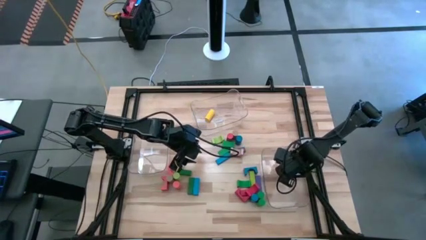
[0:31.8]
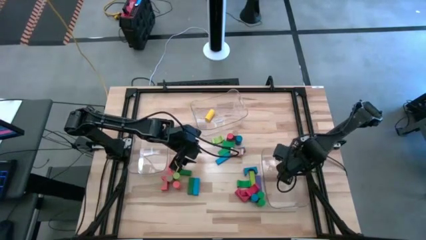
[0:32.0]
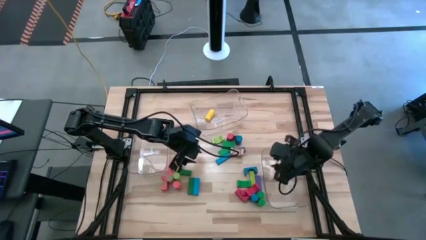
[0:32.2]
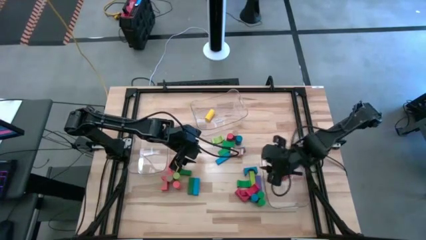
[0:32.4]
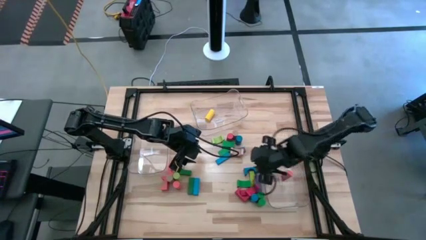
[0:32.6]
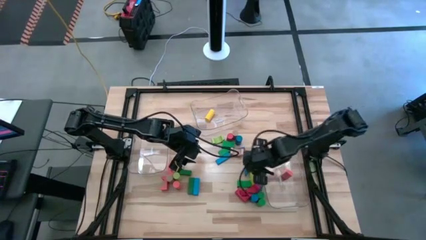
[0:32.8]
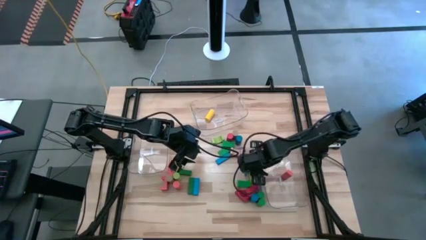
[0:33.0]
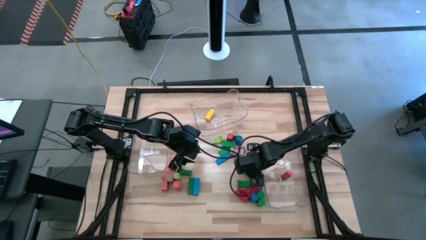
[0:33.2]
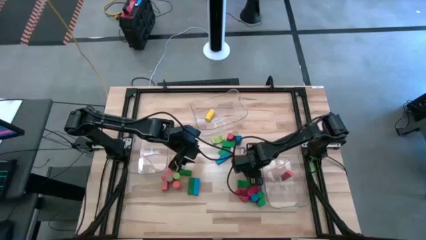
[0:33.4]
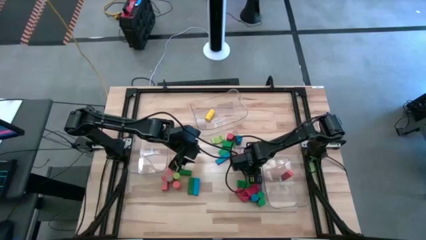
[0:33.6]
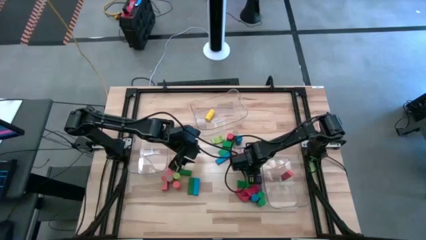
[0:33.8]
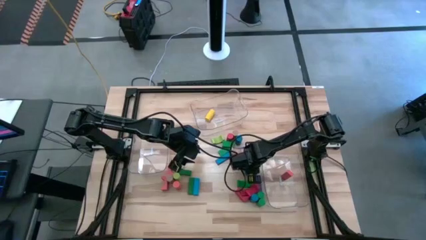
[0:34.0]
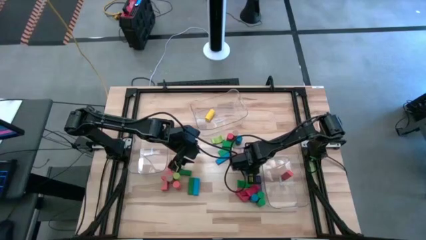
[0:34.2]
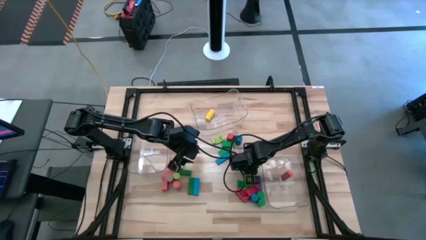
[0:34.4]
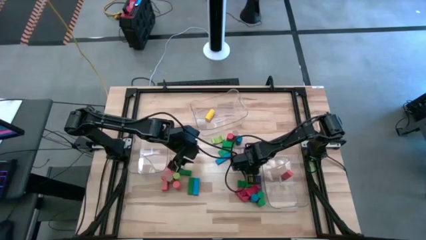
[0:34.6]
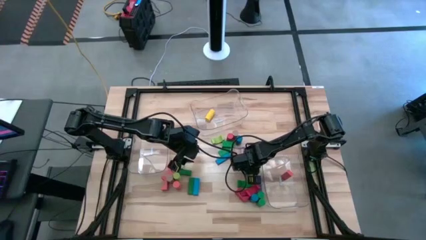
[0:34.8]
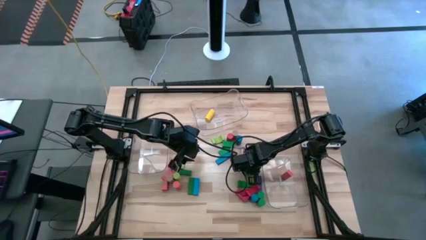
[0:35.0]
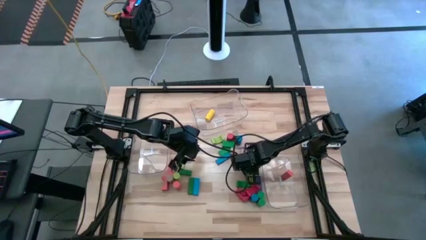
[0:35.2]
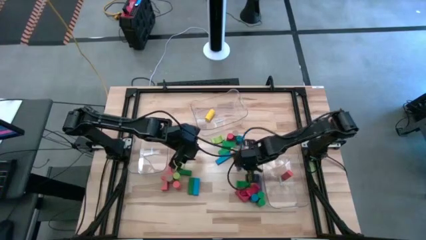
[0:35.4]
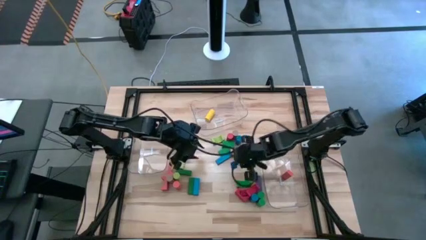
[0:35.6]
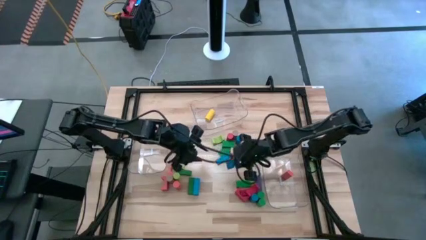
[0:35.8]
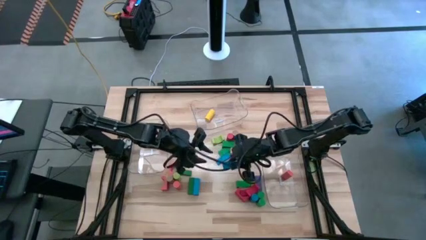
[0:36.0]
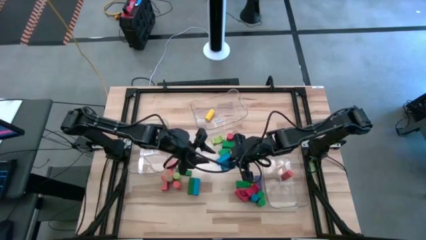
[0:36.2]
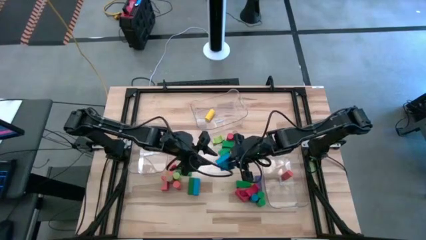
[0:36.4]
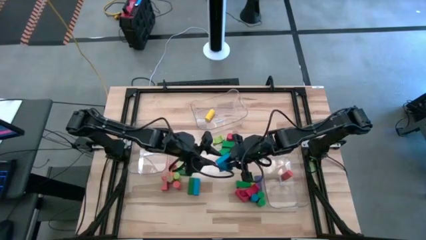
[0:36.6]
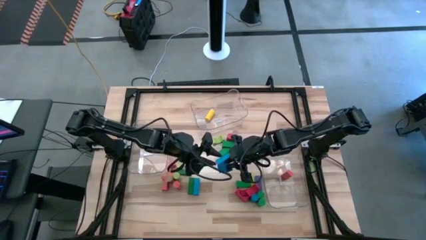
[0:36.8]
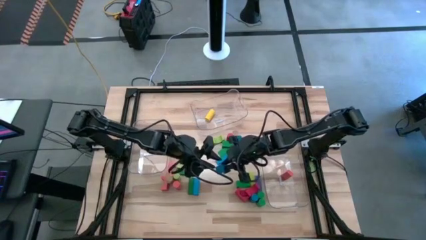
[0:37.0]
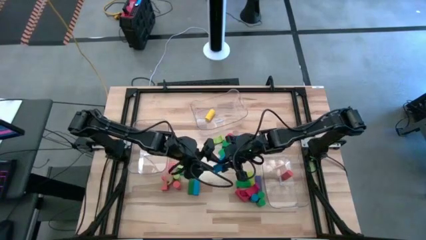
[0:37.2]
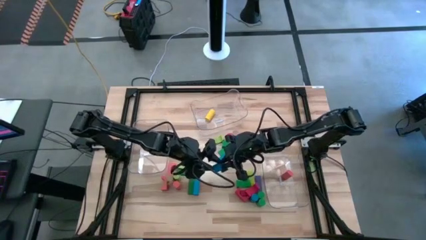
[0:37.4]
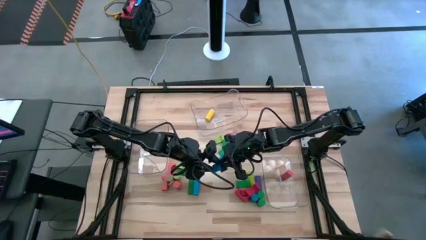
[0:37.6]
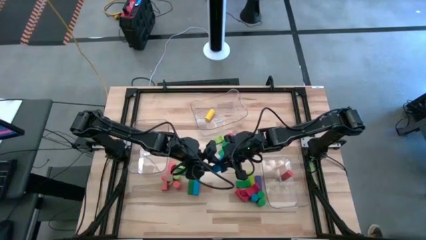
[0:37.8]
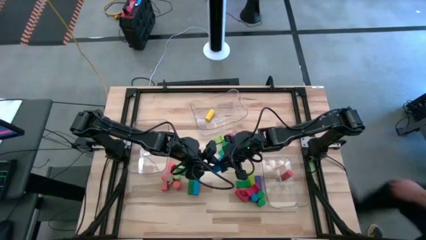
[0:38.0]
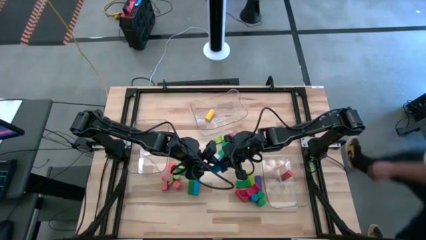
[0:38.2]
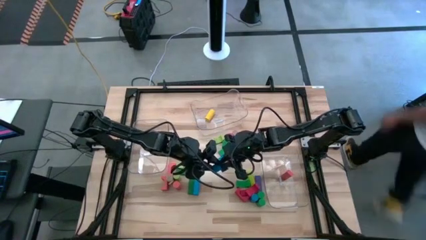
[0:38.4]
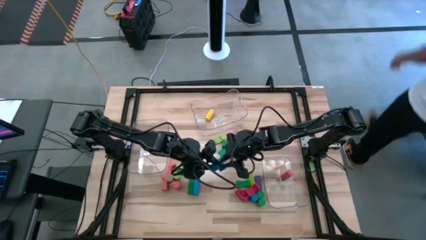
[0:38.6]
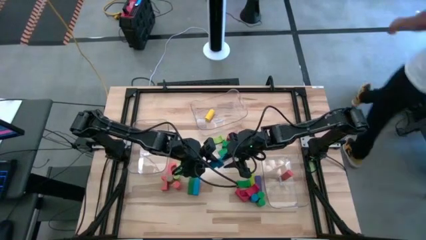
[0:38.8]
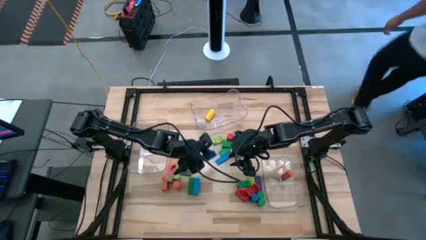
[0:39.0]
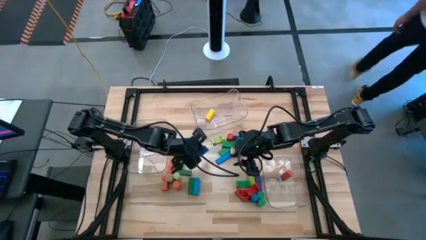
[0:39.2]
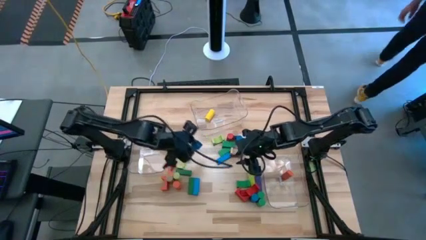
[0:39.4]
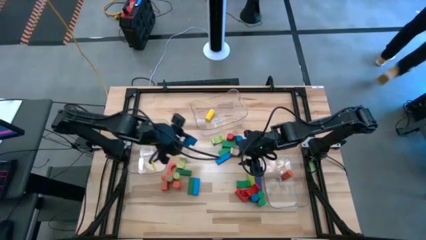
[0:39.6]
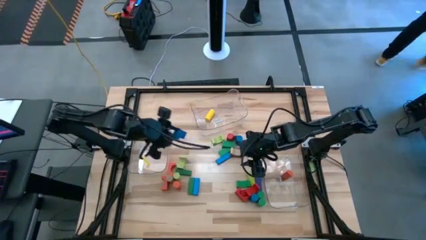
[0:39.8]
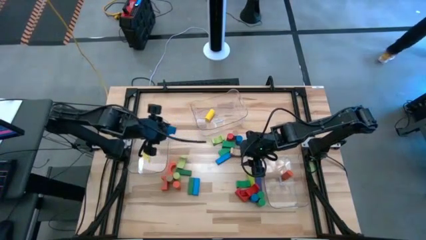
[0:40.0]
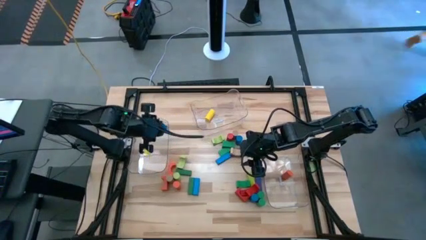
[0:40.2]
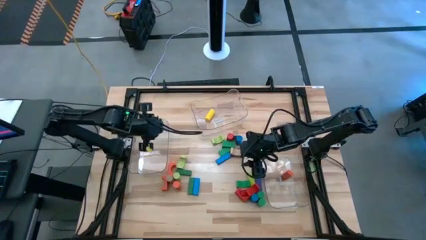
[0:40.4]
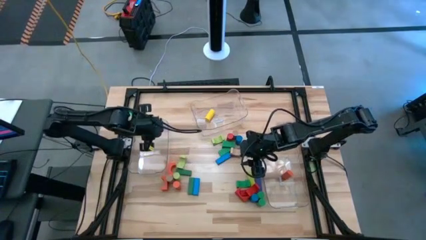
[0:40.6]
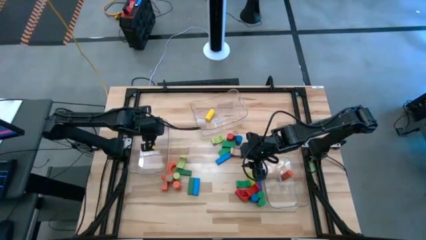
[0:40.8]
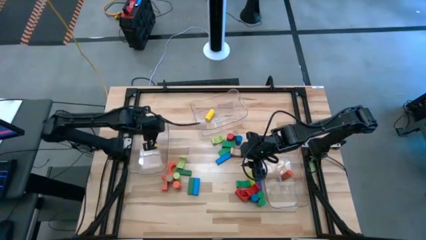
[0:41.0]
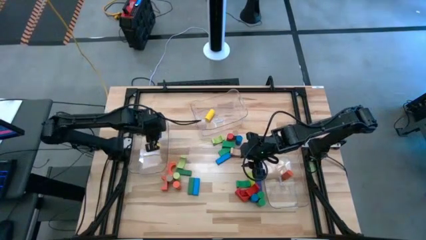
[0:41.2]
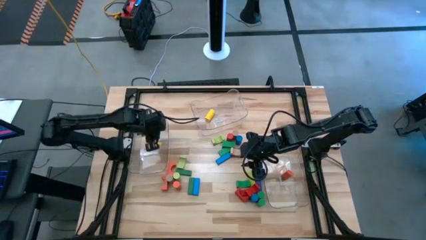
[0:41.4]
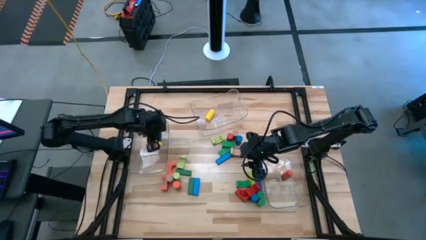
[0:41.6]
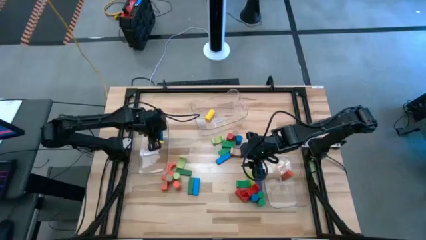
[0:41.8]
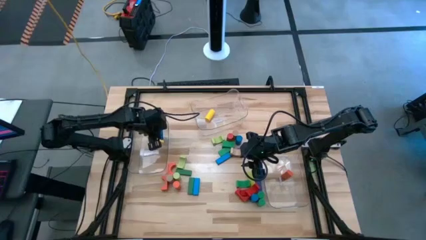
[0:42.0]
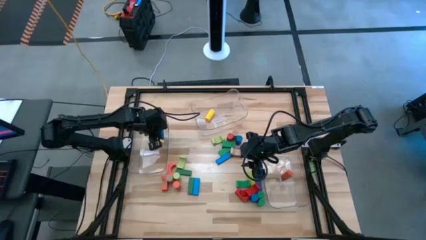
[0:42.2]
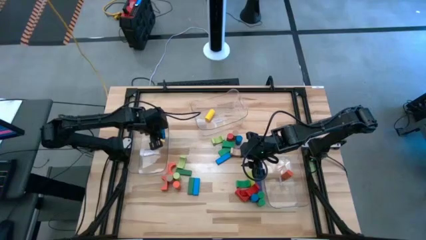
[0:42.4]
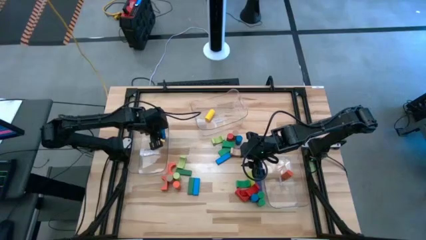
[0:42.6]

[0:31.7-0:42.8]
Task: Sort blocks by size
Put the blue arch block into the left transparent bin
